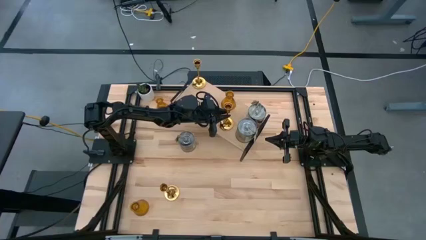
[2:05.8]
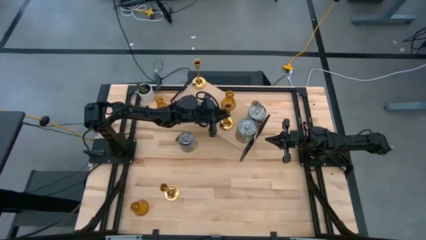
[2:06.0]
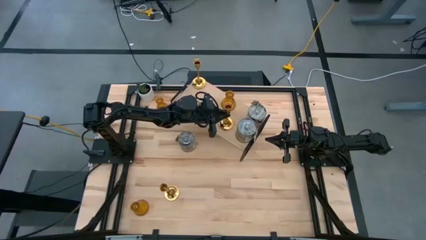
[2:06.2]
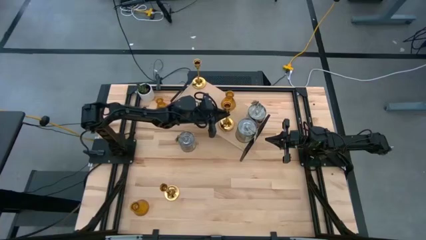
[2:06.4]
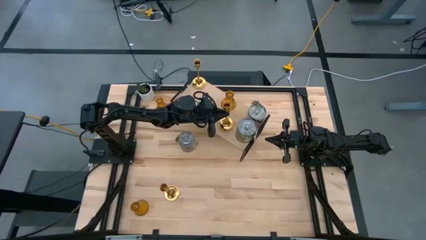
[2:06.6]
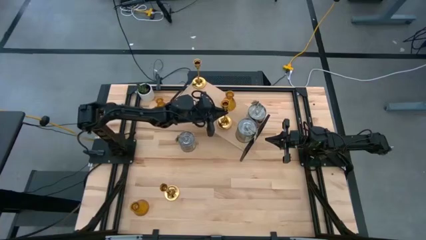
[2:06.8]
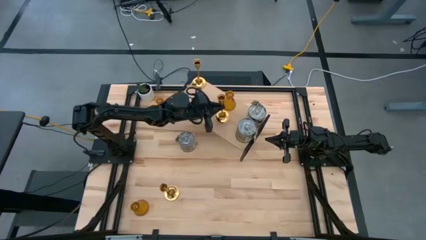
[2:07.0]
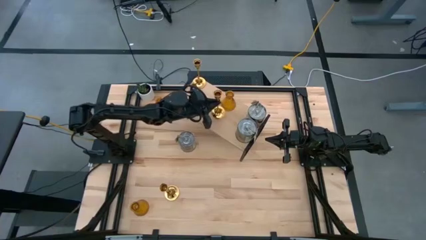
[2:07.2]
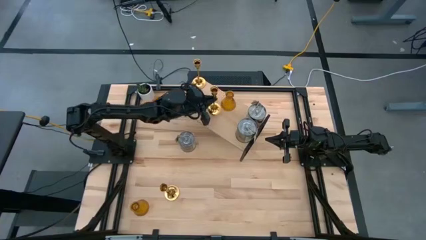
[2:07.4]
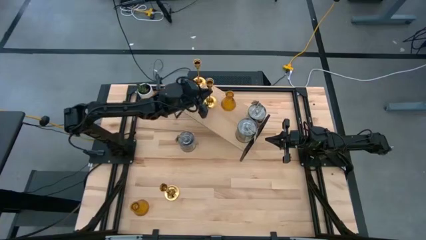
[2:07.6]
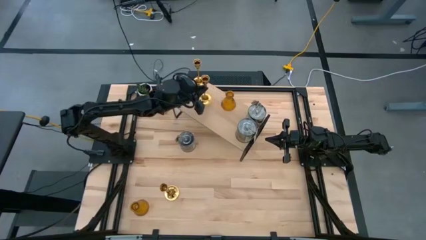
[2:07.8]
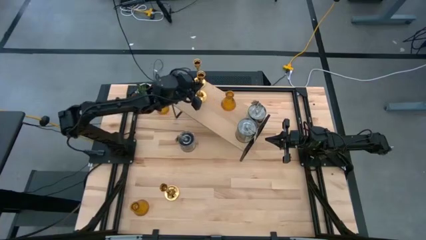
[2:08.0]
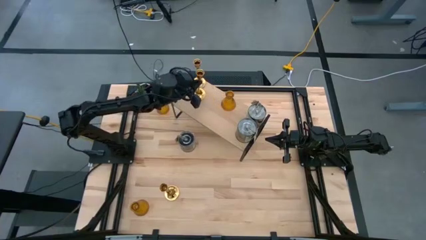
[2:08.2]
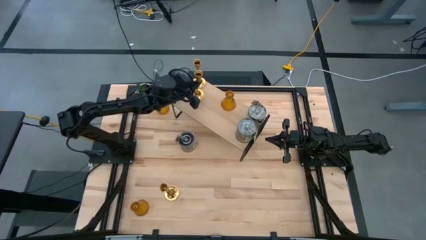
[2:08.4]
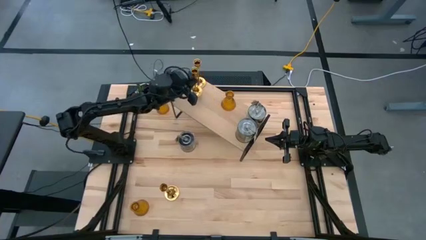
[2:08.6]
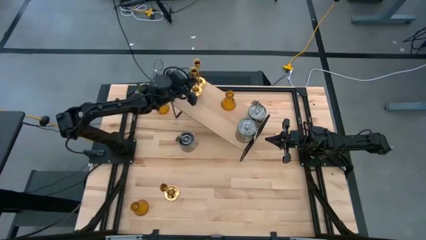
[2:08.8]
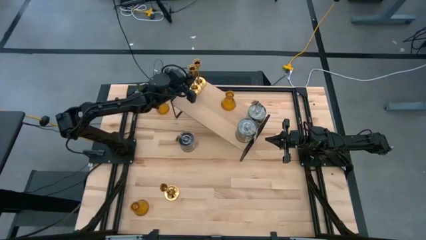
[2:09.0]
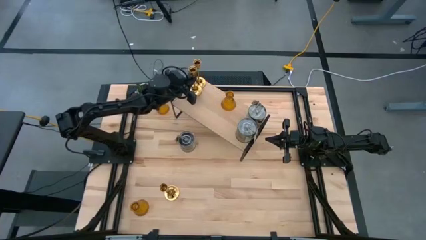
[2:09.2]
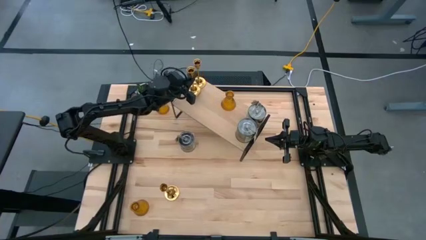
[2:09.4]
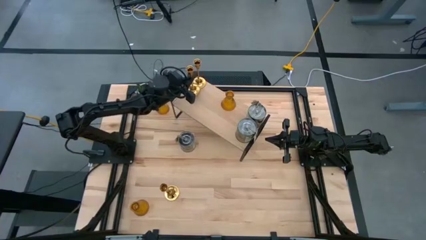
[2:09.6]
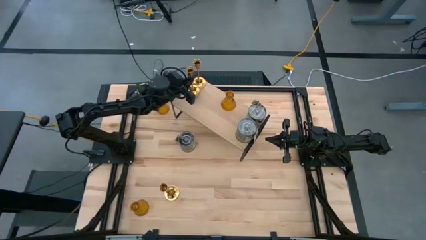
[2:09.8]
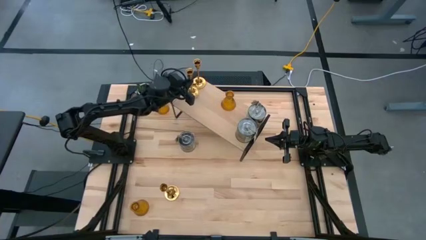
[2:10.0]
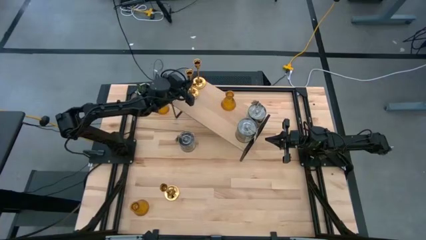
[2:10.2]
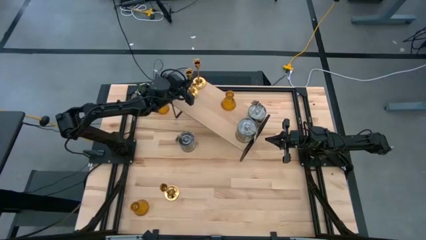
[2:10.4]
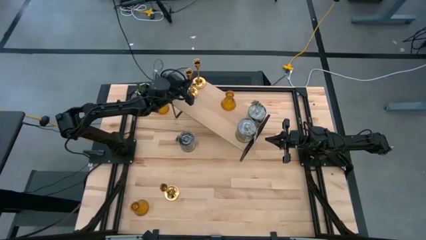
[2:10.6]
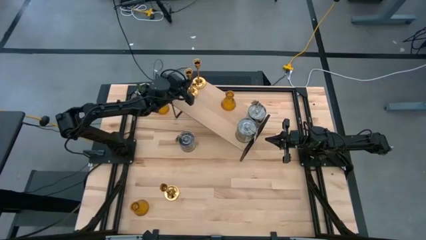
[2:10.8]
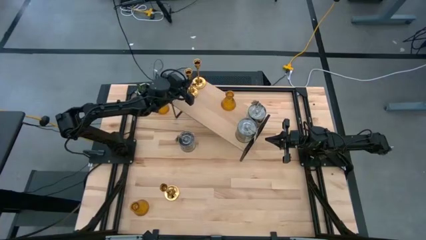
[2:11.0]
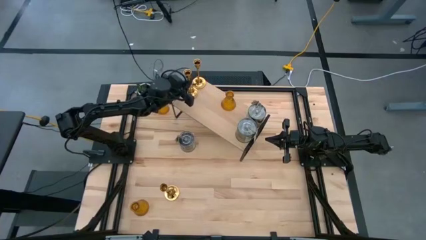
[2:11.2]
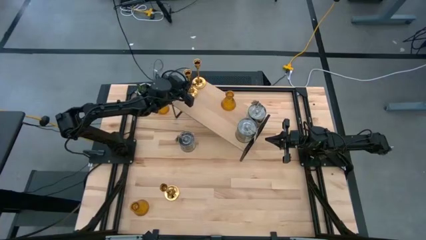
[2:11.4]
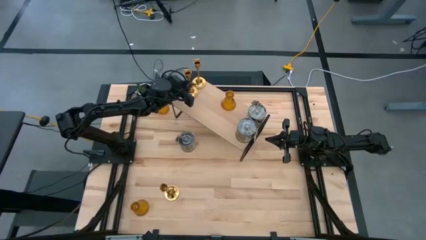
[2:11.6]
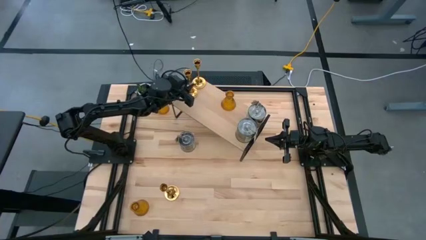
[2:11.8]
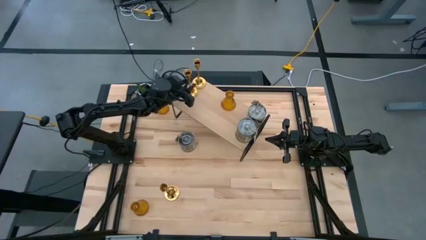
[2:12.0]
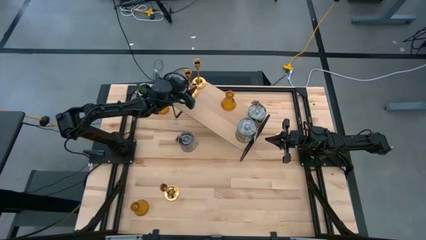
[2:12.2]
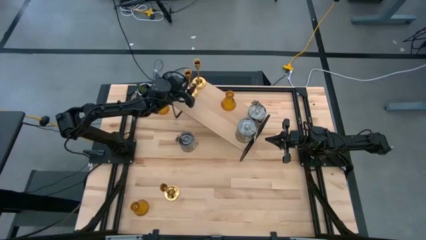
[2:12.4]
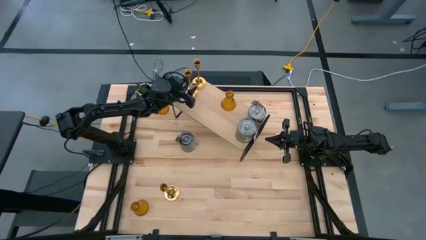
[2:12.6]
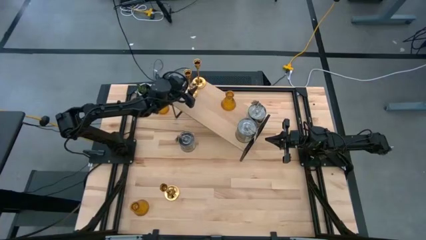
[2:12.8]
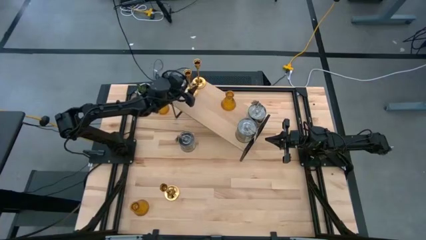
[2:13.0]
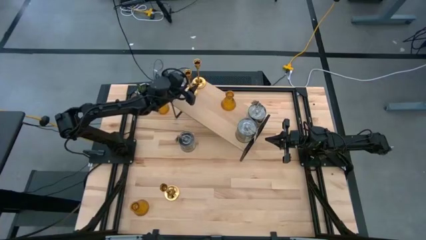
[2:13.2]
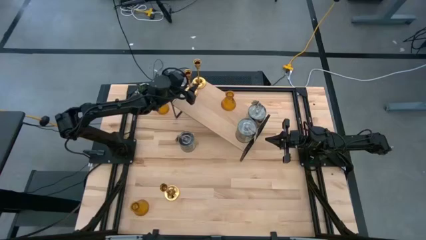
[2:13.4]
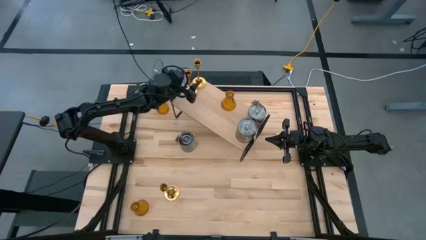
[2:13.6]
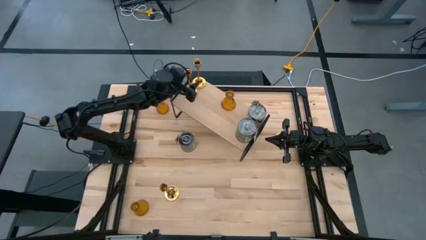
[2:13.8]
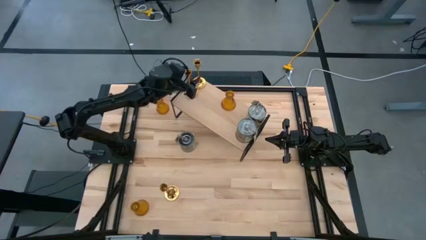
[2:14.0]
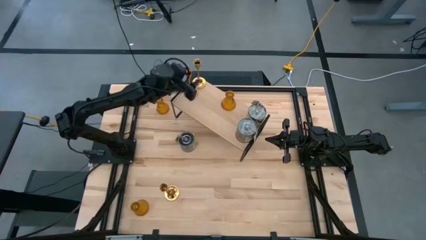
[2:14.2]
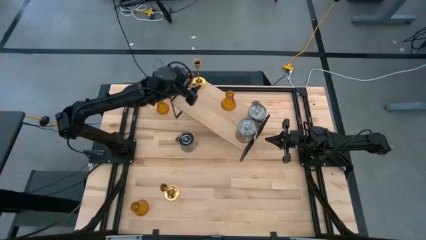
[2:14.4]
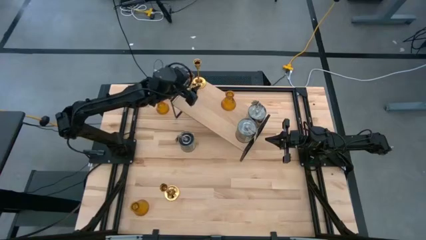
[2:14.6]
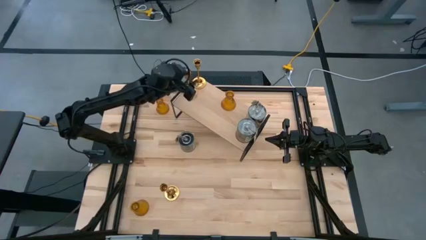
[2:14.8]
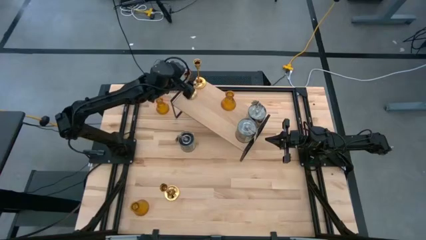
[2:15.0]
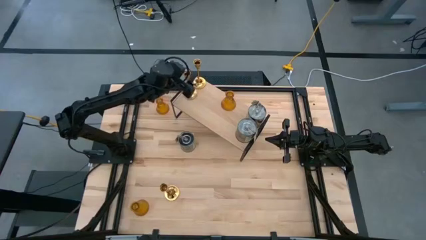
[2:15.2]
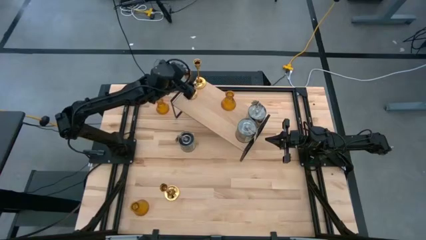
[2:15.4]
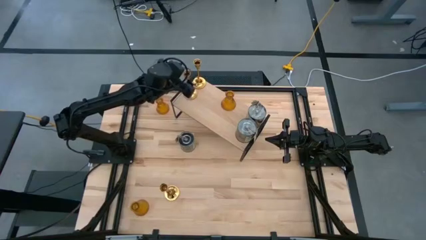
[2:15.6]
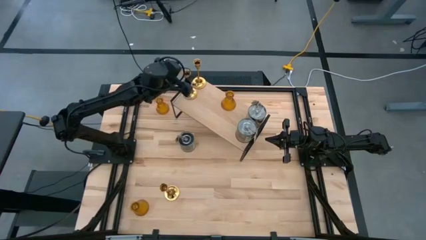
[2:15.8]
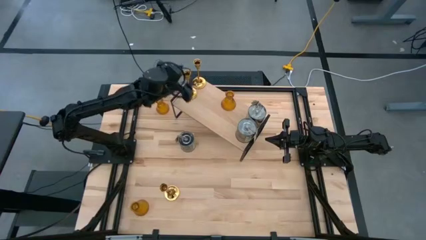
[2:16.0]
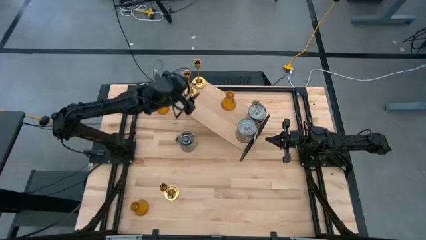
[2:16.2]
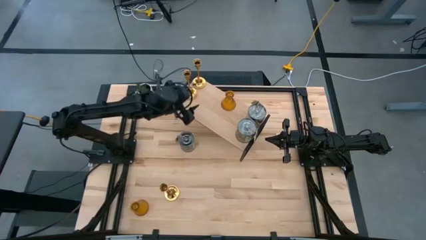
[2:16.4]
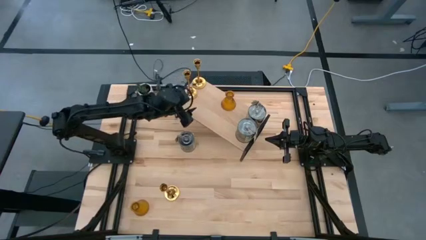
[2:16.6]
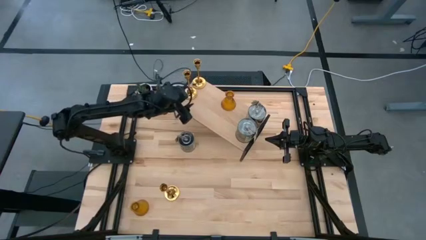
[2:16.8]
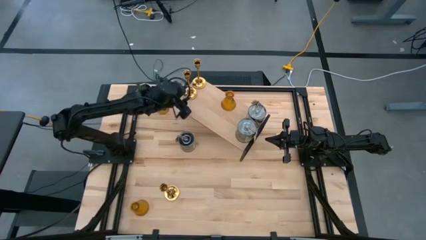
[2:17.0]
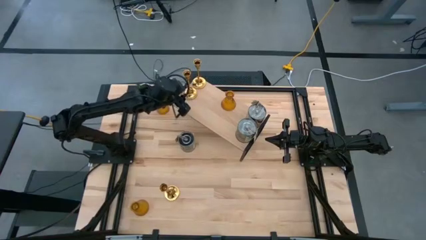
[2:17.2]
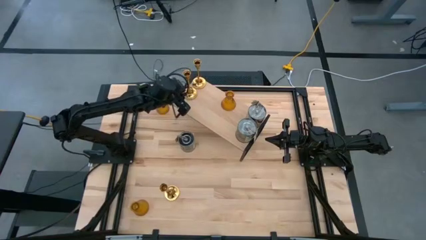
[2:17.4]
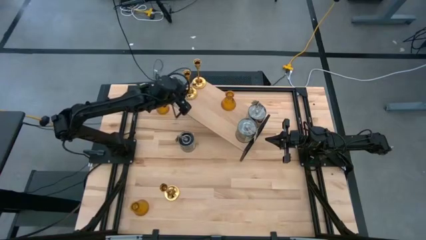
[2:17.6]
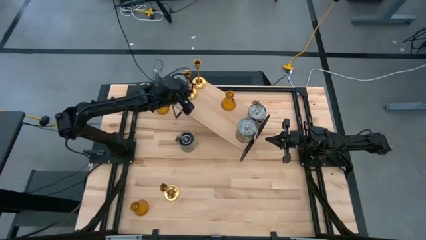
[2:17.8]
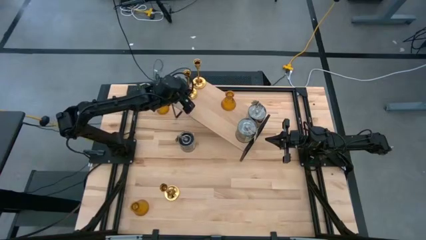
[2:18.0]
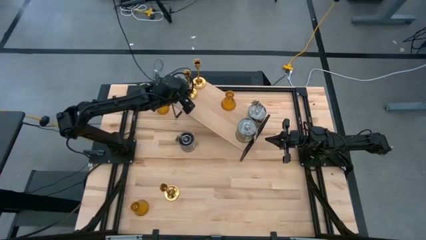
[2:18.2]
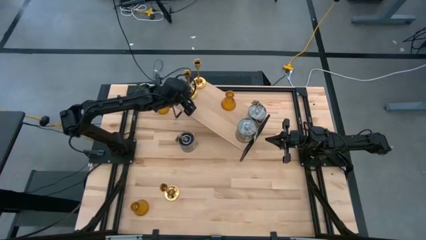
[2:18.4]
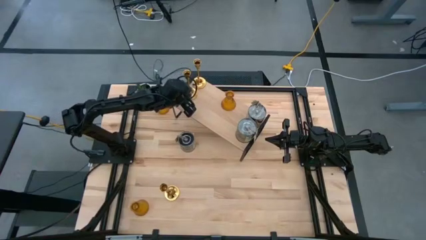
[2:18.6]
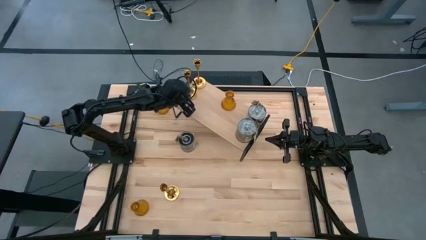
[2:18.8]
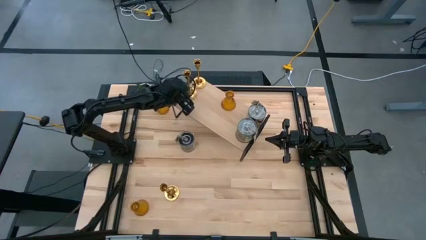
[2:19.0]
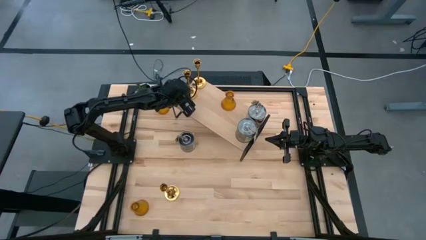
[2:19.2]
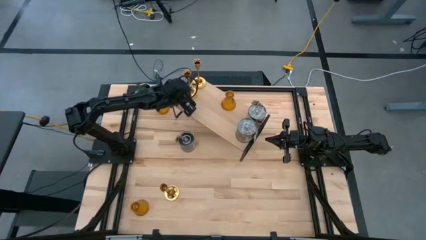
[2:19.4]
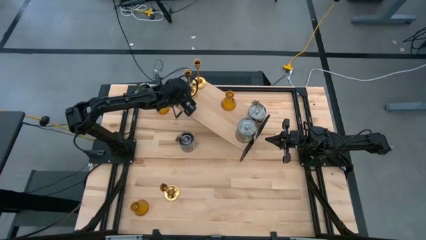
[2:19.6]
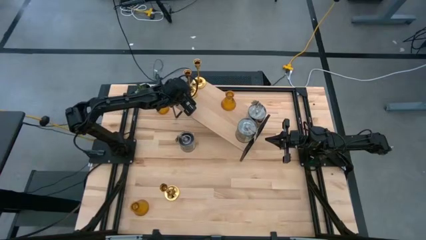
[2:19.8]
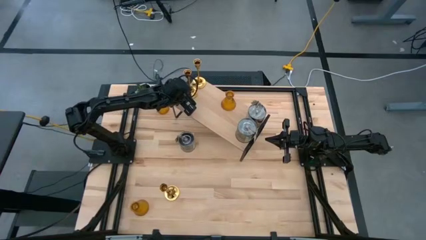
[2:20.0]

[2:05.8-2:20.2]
Task: Pick & Place candle stick holders
Adjust the gold candle holders on the shelf
